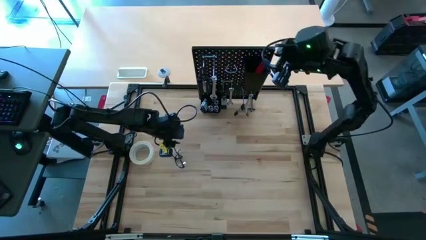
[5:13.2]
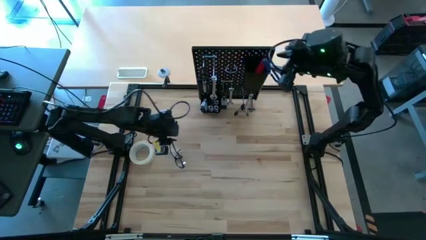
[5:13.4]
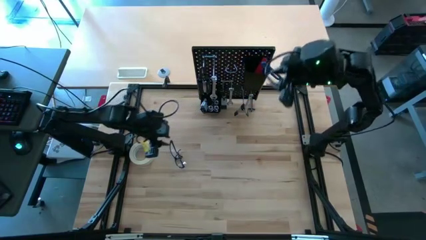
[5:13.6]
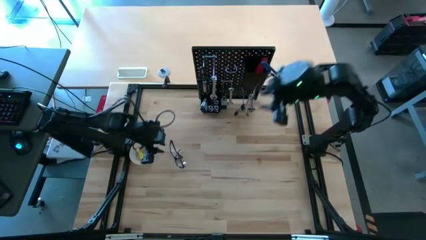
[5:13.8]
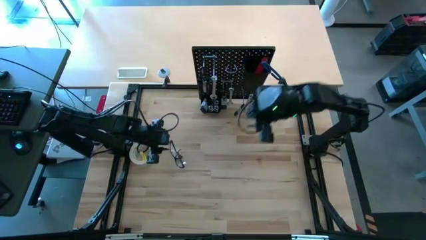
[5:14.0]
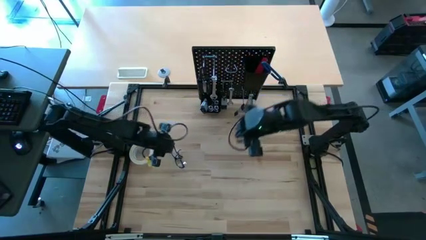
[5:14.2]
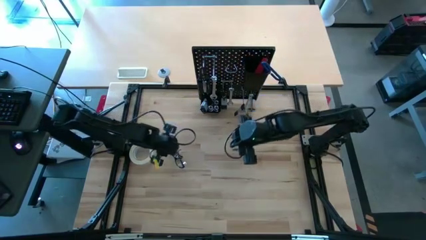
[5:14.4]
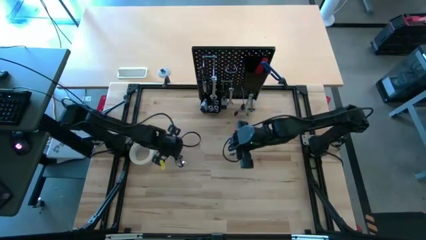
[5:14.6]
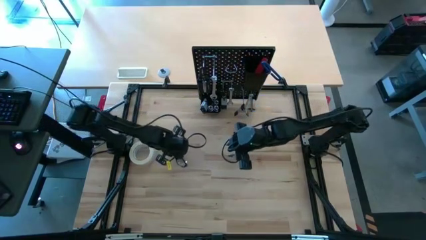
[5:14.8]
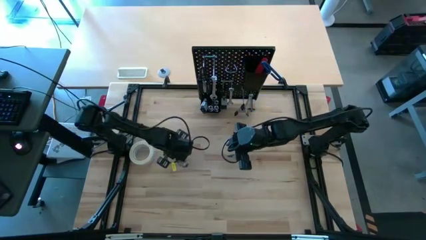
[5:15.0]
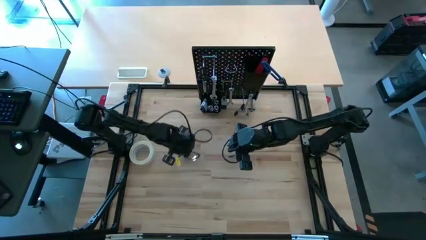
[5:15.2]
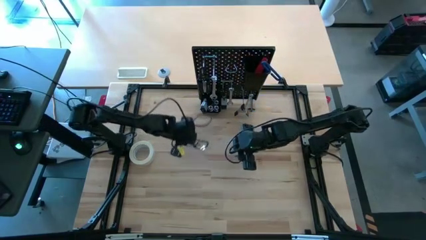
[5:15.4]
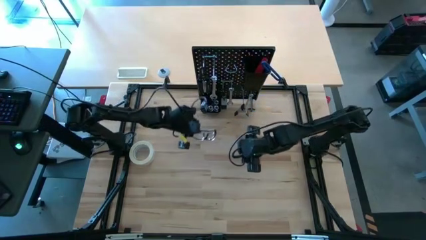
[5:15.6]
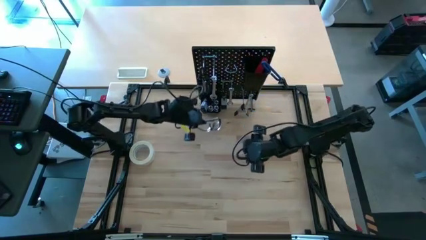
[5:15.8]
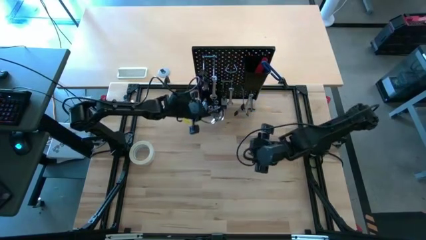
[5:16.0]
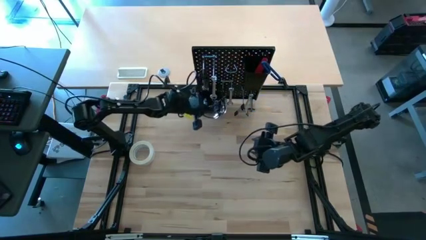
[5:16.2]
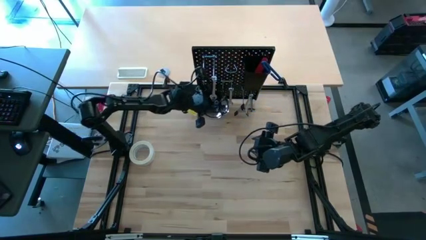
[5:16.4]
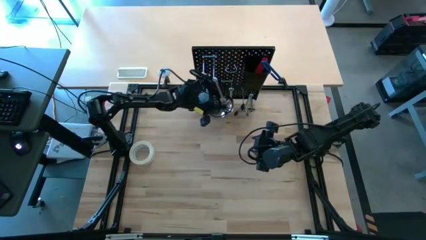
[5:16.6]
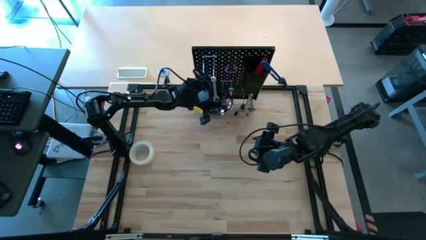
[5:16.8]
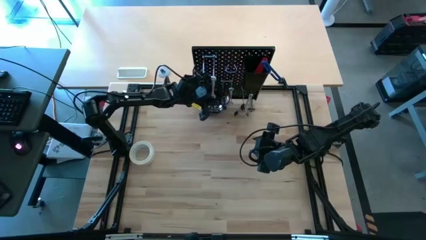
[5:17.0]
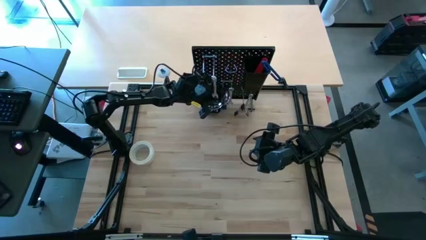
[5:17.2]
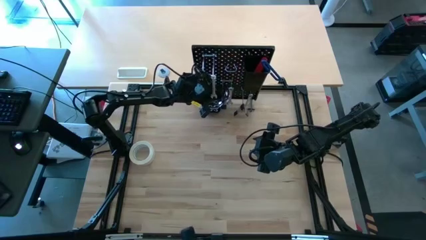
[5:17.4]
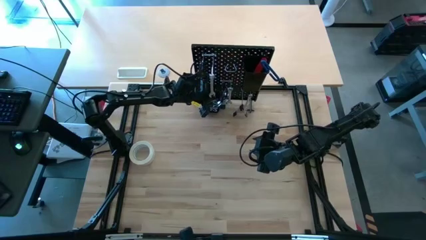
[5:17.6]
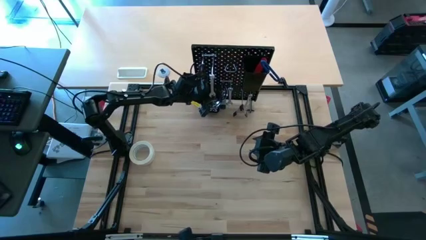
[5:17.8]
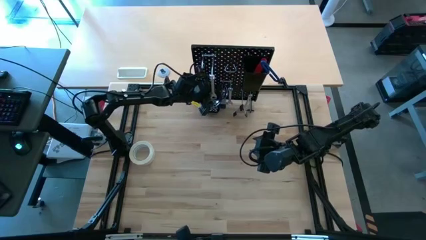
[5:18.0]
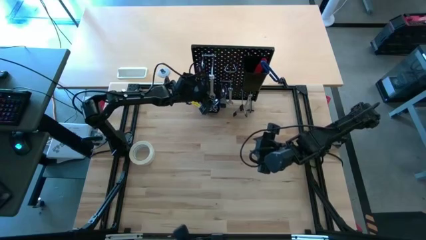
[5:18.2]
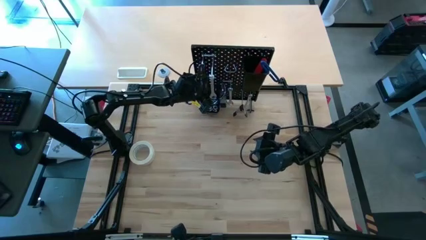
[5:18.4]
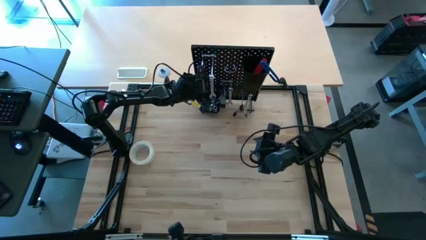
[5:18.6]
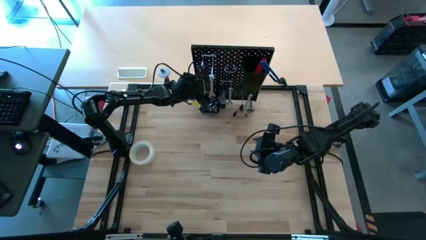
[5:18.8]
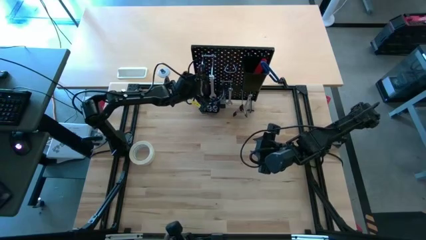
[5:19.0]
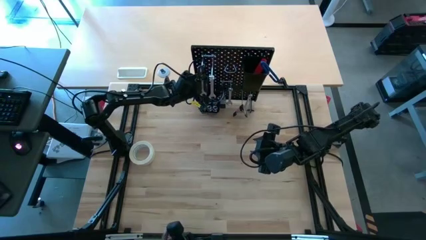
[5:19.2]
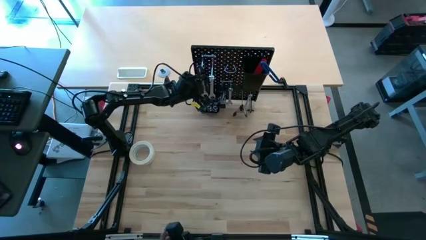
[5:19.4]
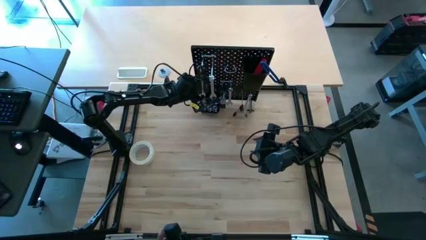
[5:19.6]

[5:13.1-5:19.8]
Task: Hang tools onto peg board
Hang the safety goggles onto the black bin on the peg board

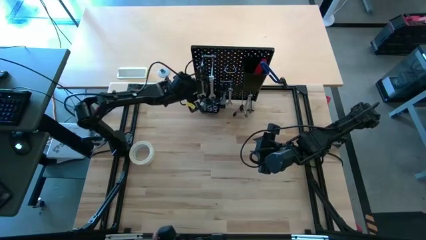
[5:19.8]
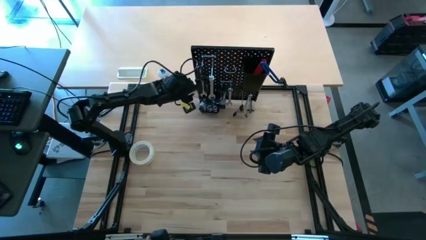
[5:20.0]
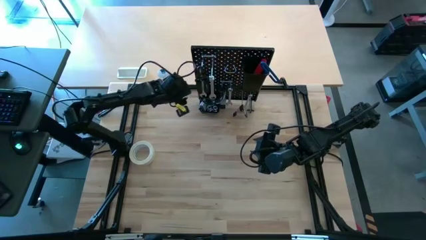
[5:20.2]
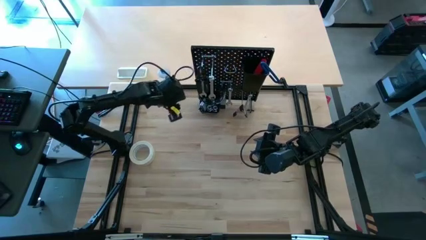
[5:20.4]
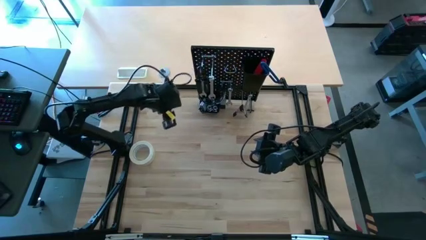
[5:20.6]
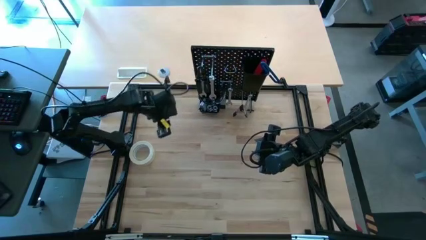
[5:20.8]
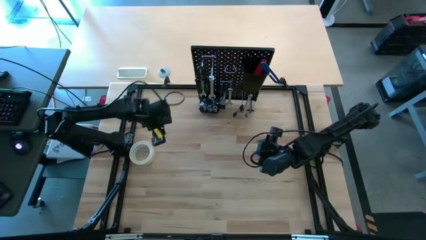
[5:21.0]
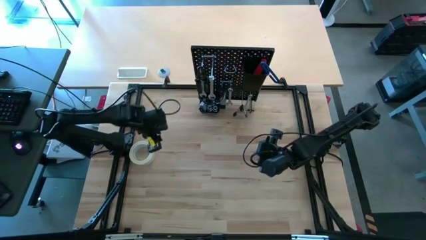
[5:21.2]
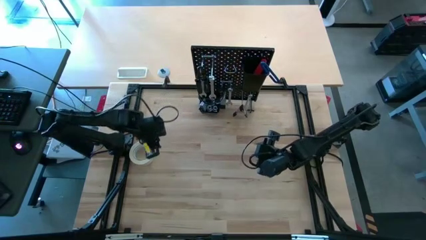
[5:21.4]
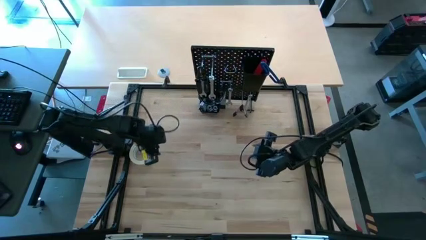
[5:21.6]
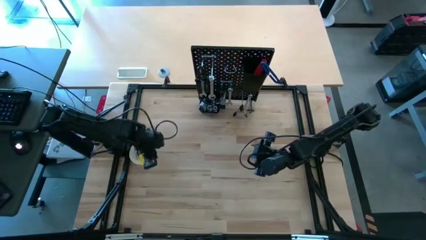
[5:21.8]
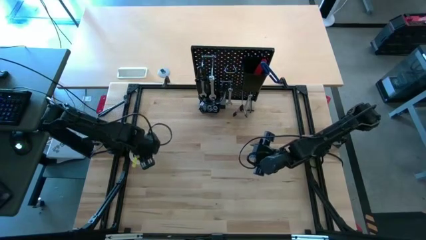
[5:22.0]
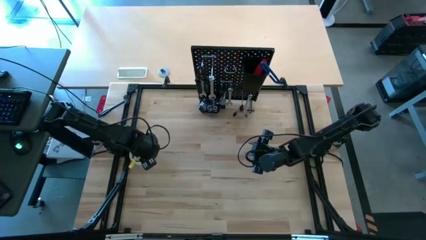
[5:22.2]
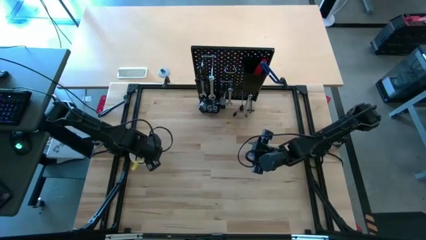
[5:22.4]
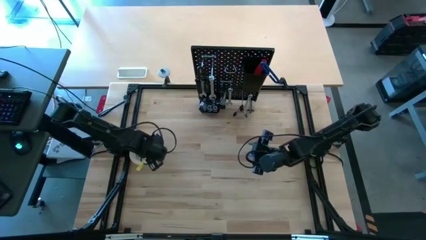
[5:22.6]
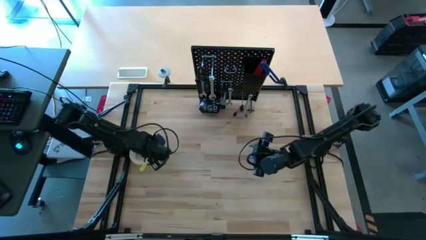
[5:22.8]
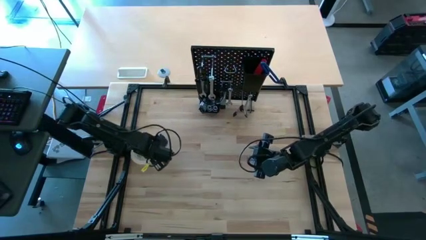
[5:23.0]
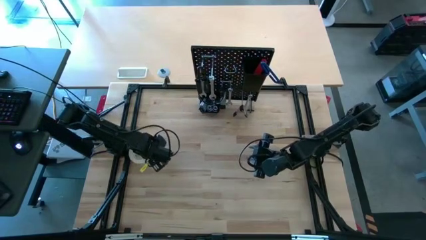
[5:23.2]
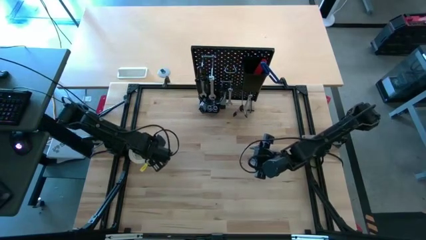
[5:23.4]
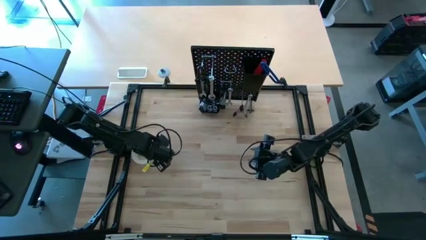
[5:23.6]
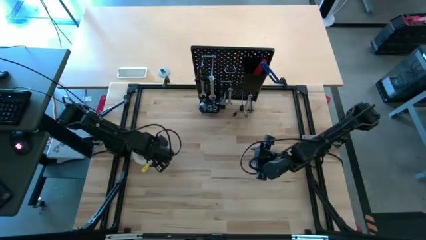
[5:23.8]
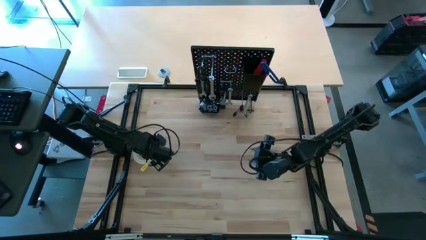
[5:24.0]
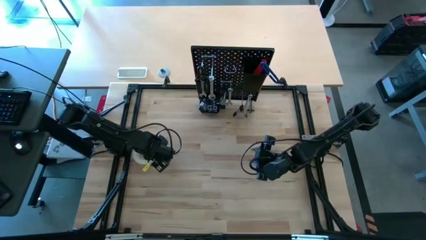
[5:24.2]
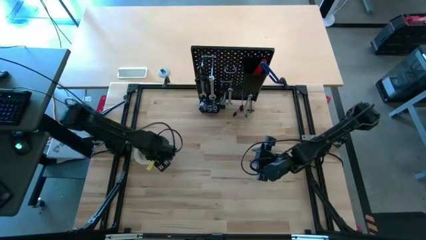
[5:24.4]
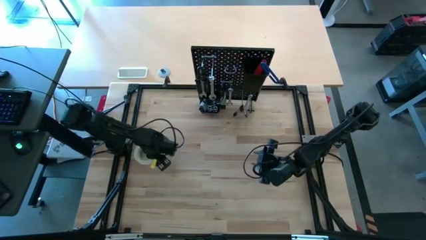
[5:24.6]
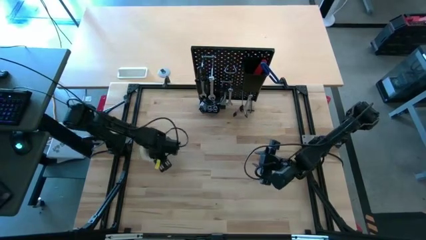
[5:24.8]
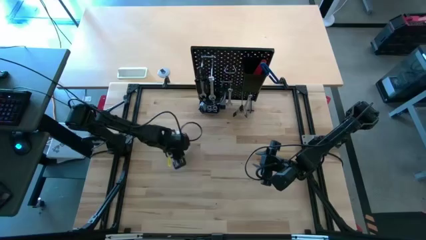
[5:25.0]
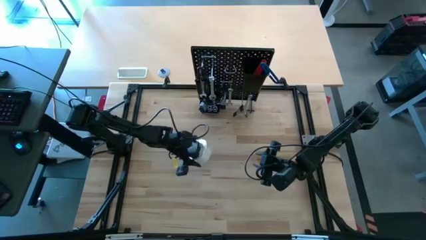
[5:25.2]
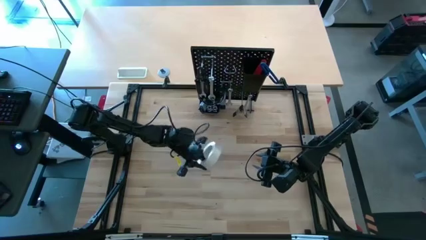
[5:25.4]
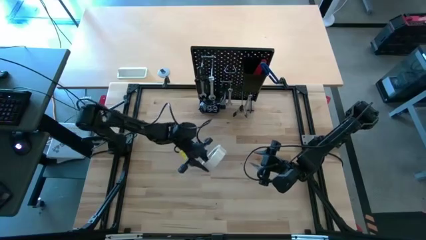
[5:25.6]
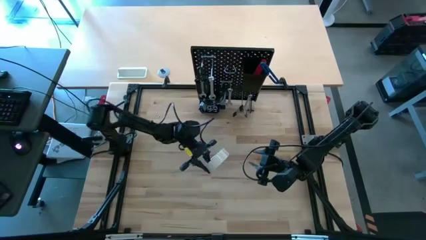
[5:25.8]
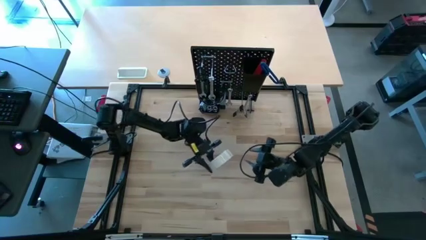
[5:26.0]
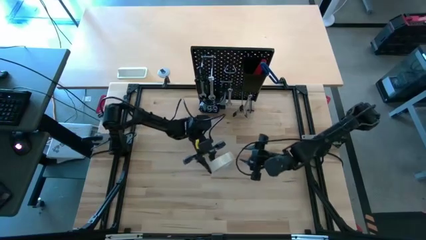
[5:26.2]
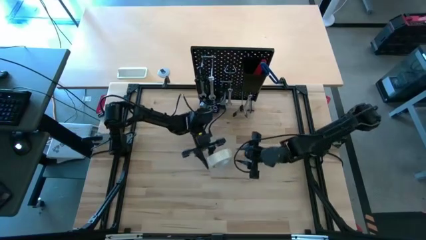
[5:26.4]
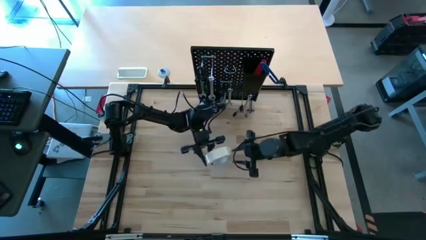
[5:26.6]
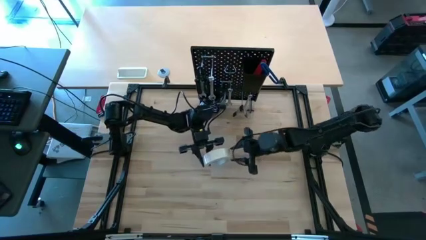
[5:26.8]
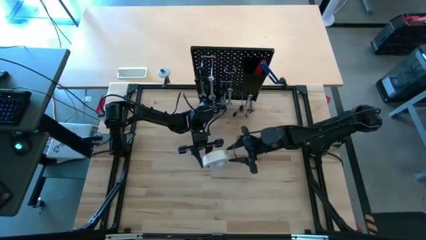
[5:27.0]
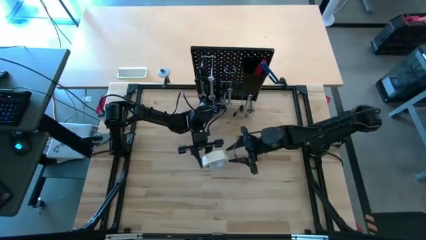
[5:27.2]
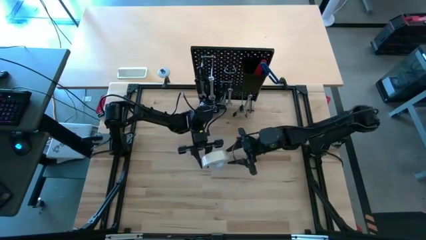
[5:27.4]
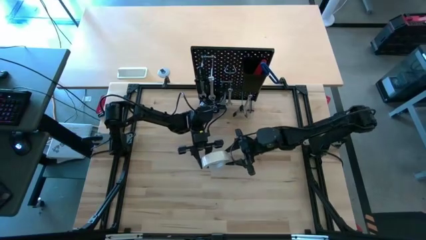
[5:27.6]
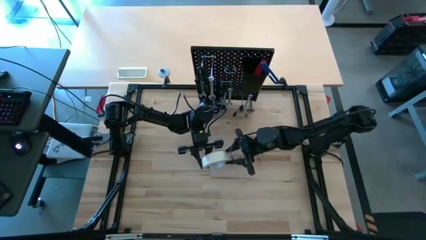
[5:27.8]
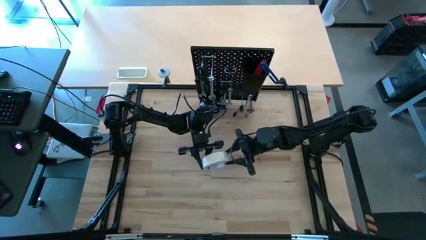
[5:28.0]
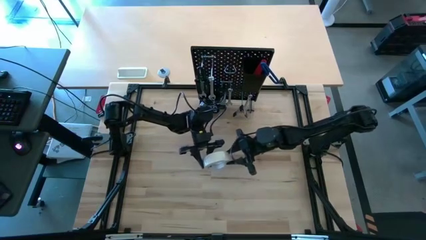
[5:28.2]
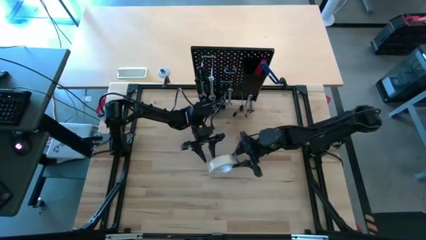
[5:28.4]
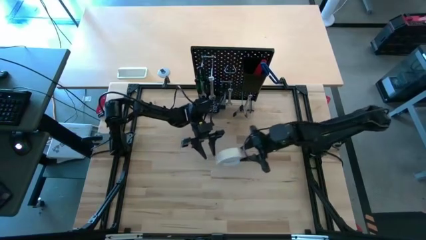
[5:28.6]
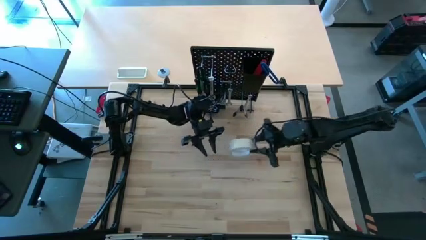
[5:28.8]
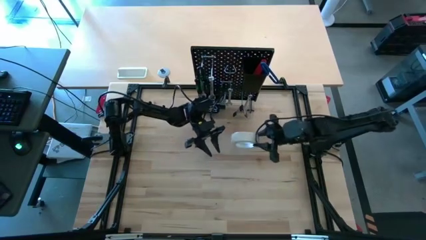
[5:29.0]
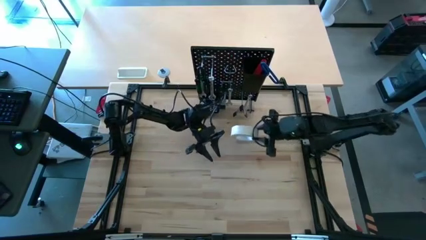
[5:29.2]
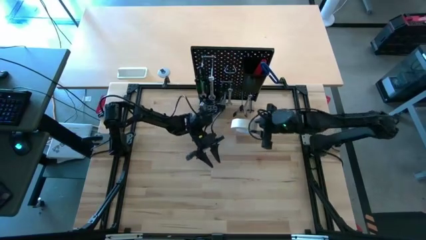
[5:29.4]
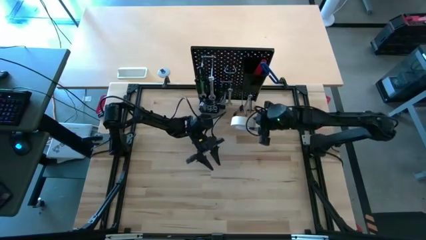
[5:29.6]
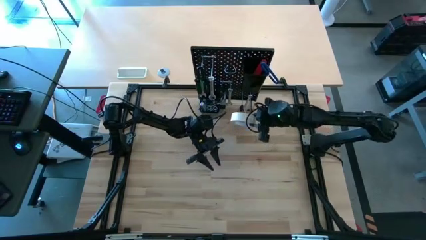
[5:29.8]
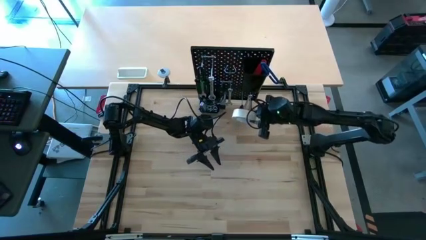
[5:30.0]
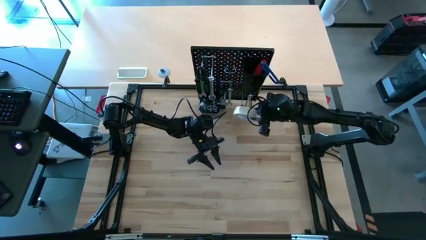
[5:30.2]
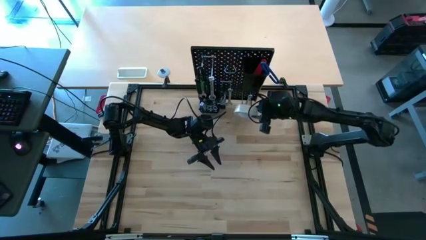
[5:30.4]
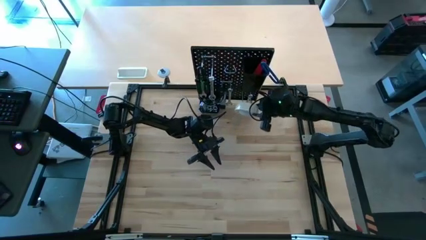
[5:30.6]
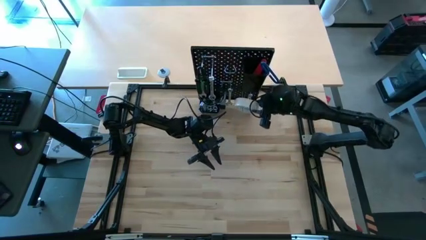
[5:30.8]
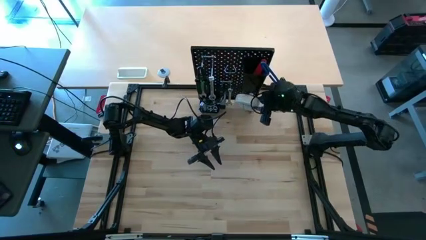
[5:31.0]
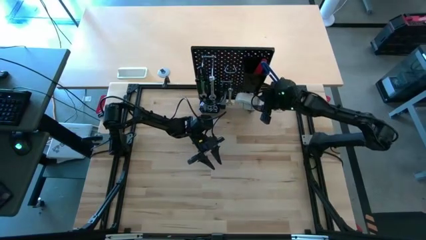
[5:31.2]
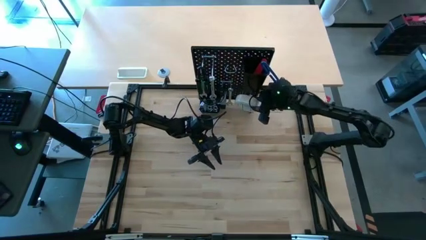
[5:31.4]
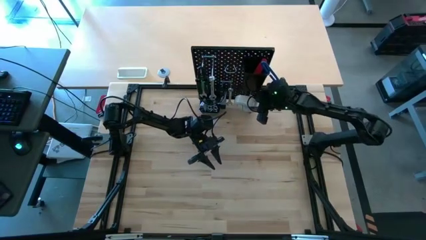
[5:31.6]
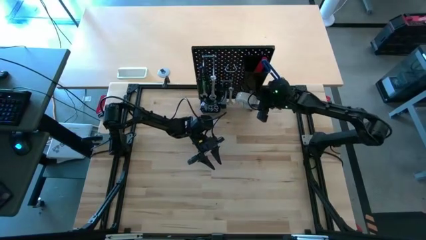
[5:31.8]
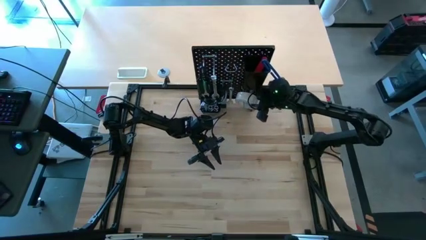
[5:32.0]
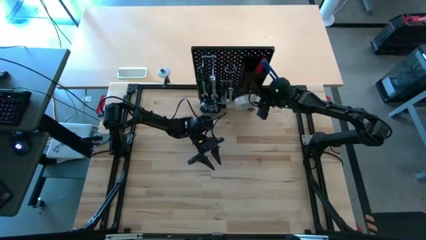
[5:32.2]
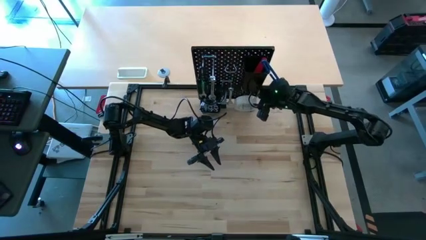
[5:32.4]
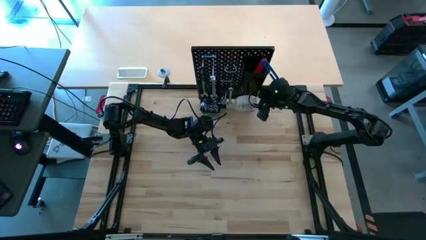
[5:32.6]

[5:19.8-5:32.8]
Hang the tape on the peg board
